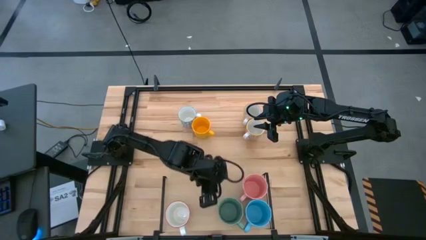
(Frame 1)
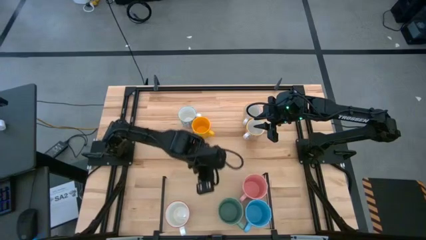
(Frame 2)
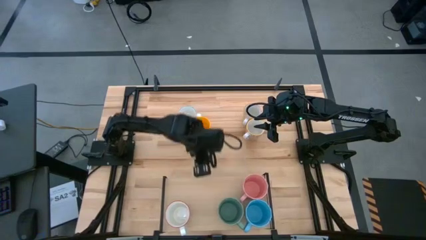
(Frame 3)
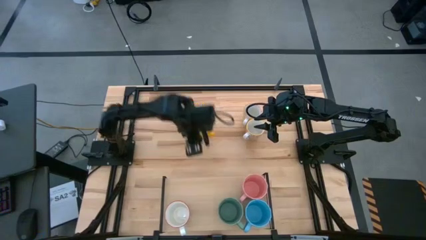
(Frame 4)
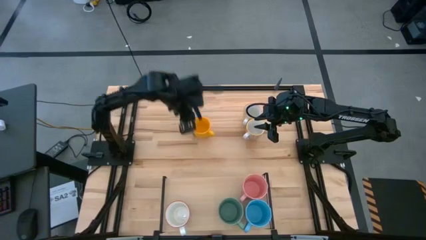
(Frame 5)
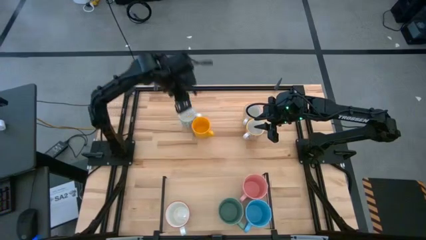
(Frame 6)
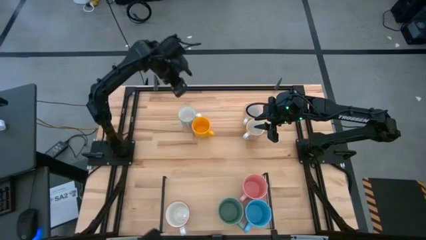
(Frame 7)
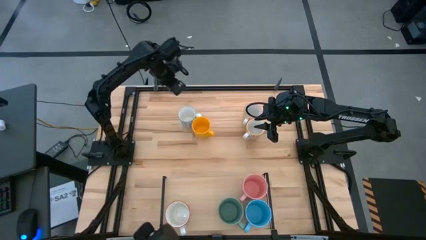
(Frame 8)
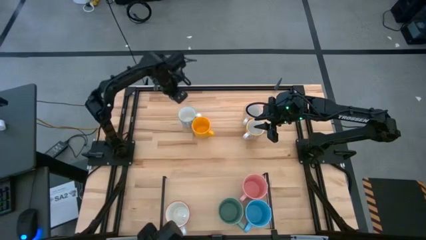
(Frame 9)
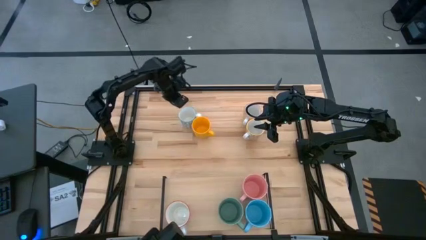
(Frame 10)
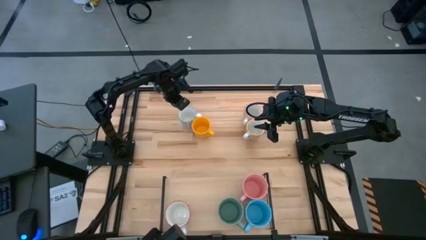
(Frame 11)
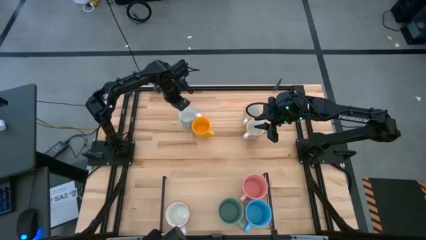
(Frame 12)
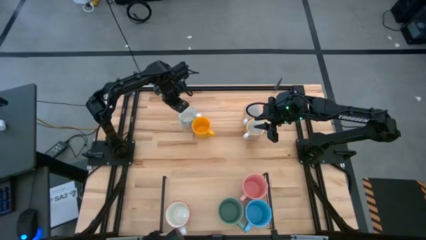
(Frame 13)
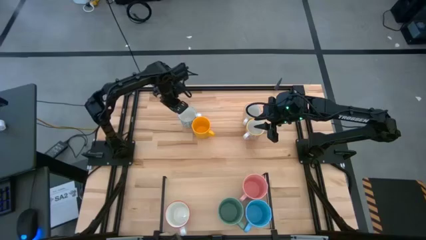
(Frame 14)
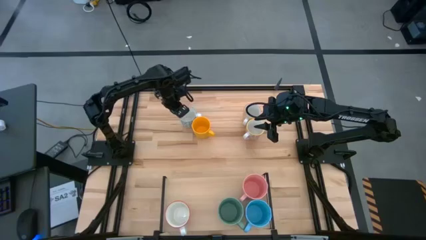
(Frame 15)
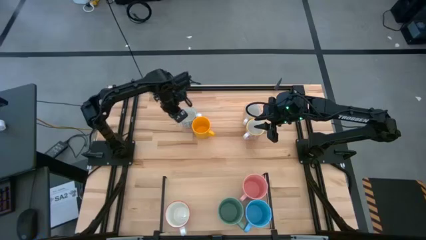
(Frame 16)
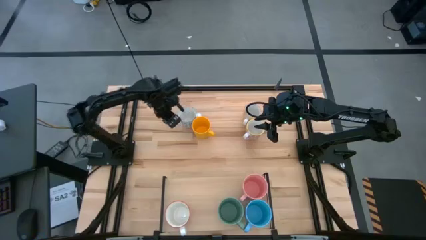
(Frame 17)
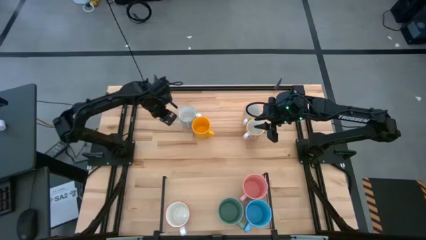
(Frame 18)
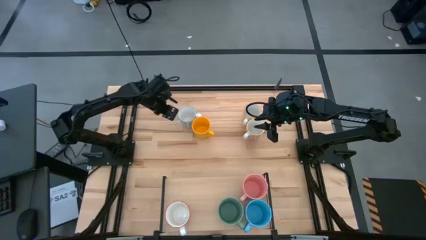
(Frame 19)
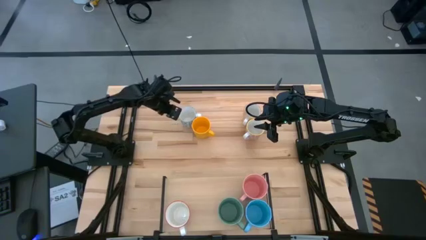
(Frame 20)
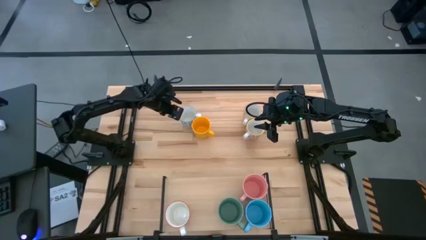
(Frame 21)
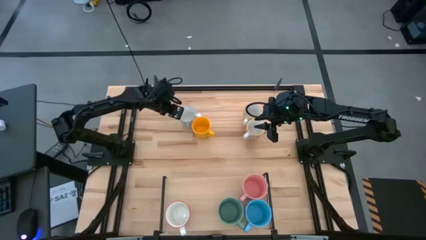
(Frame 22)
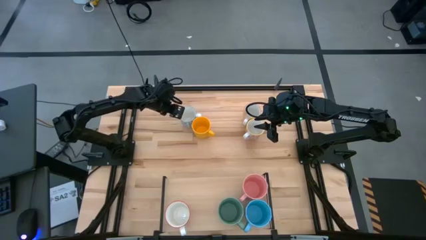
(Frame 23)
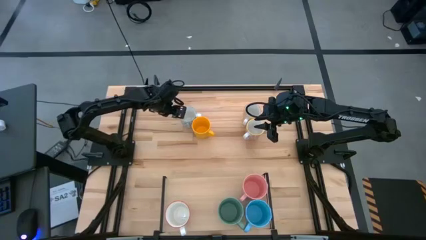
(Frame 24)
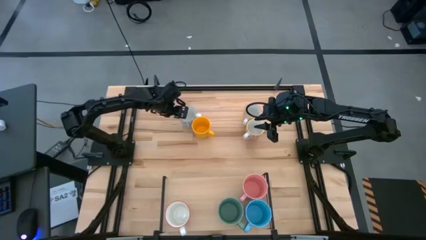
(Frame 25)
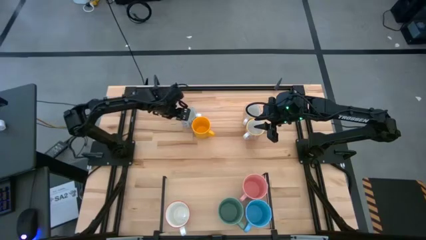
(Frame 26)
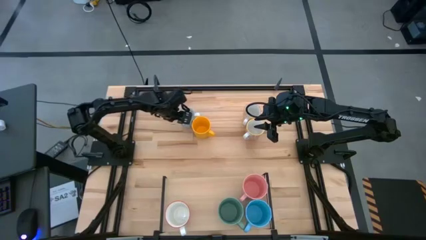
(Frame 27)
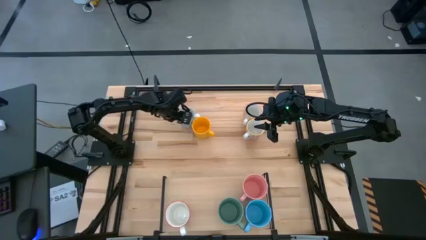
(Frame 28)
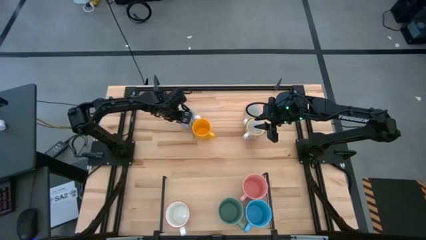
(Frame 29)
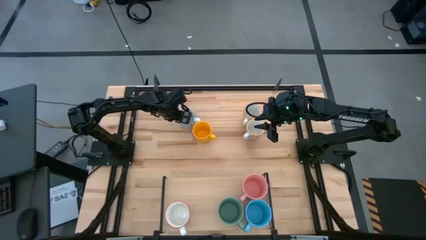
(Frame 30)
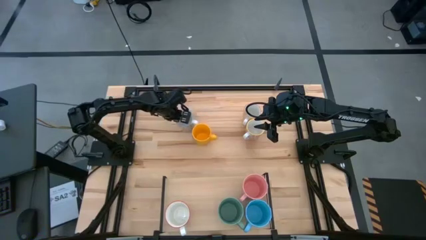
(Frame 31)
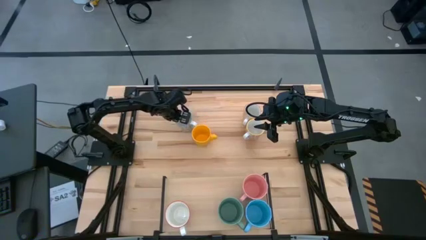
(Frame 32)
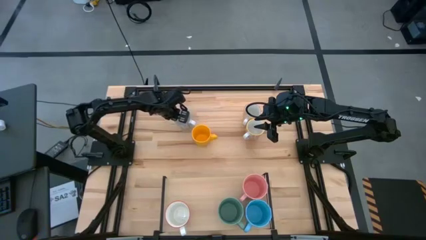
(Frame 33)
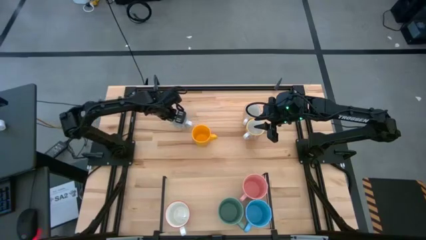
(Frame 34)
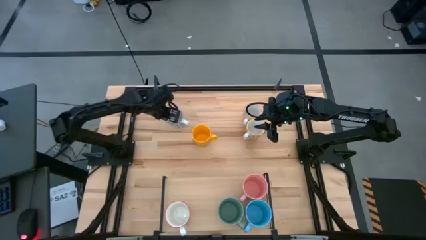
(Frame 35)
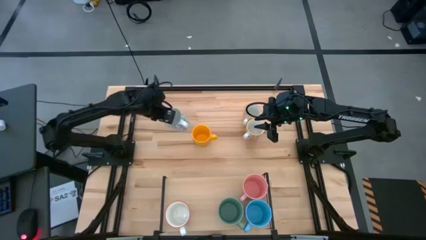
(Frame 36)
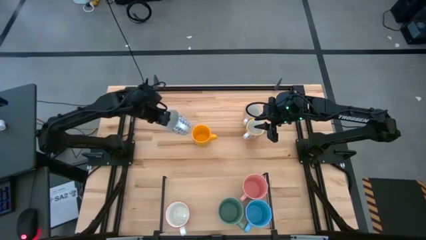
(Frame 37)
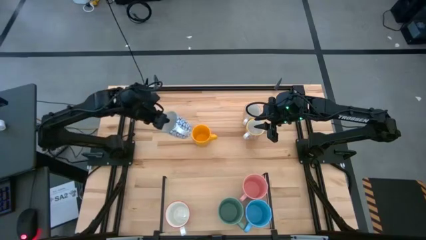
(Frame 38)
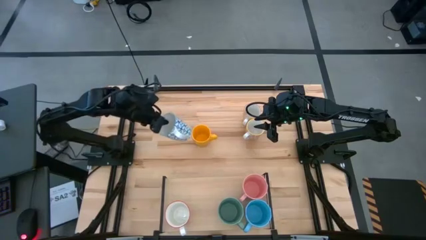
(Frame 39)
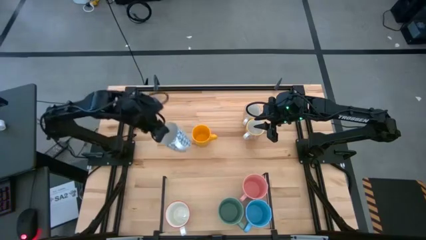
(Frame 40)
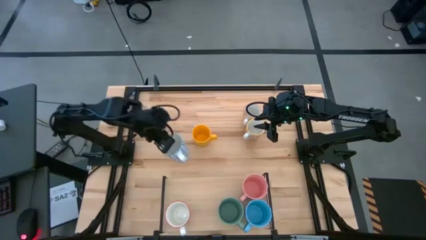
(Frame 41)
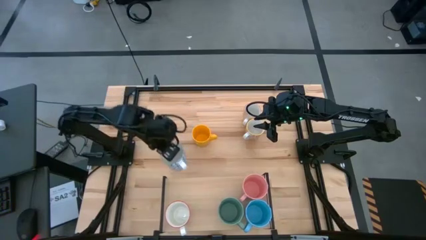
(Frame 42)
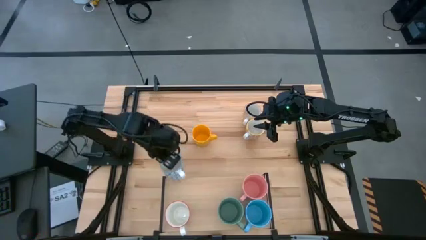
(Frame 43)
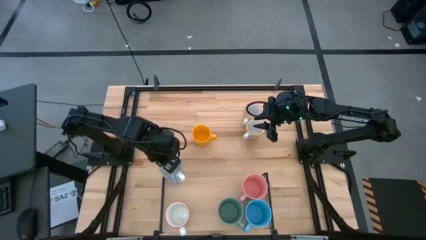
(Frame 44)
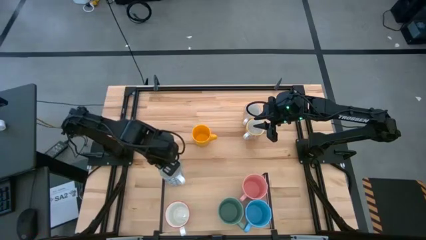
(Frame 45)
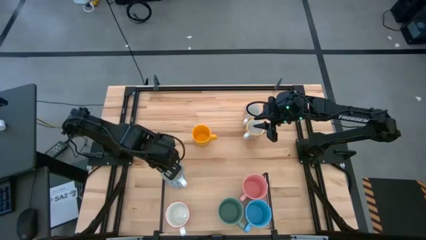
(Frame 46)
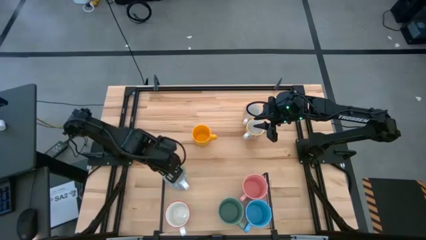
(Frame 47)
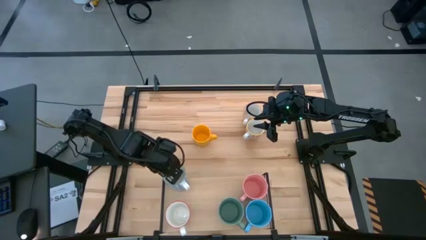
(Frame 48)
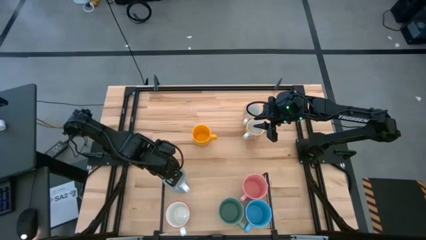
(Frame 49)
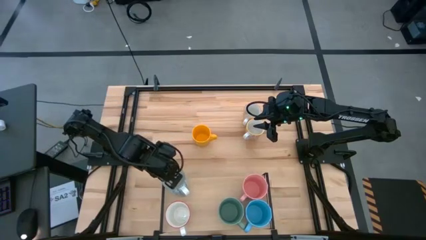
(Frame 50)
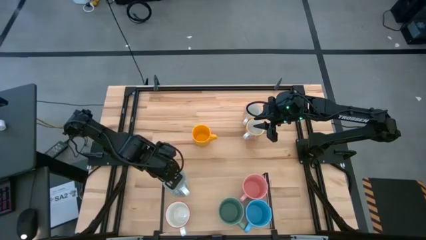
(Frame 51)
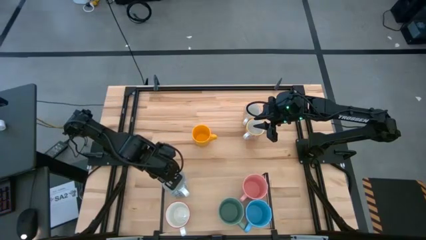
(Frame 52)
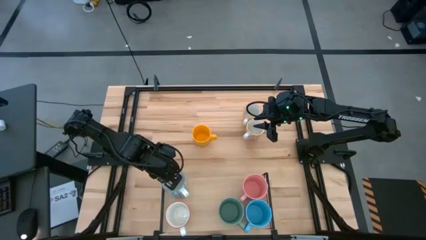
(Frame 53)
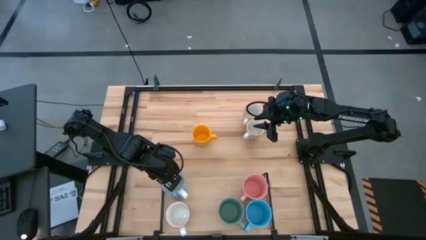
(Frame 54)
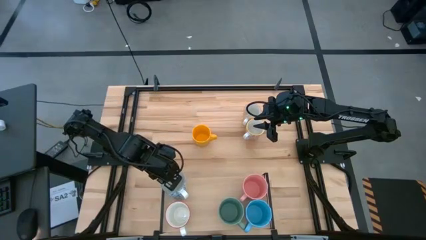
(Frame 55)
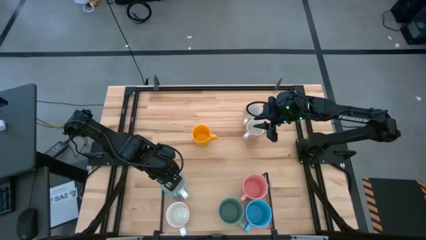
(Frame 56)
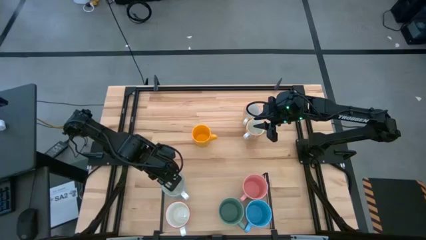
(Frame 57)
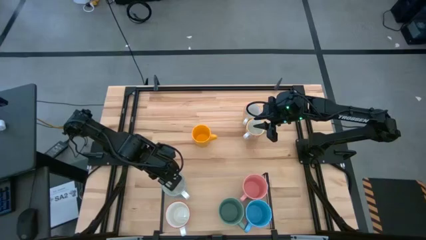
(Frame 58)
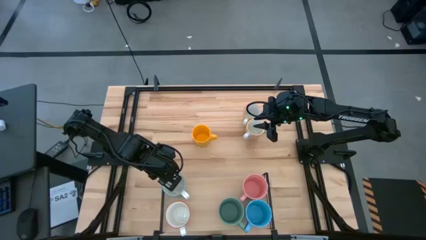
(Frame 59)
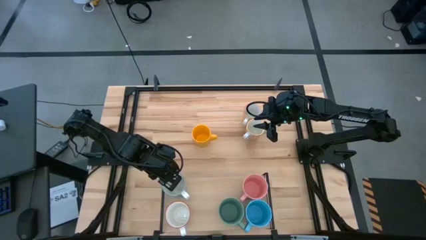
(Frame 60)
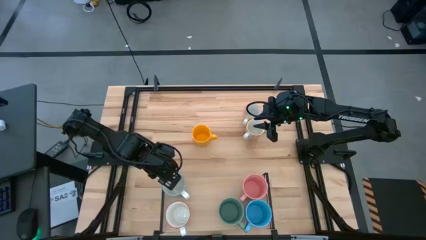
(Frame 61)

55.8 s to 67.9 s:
Task: Place coffee mugs
Put the dark blue mug on the shelf

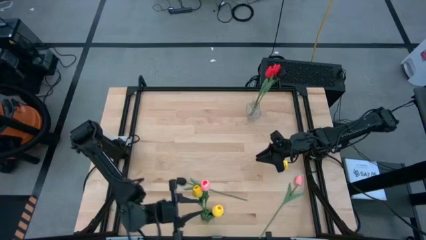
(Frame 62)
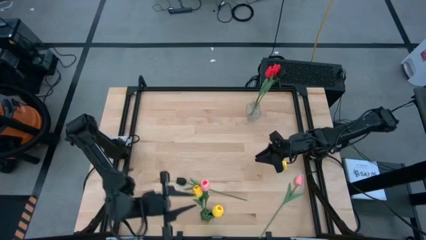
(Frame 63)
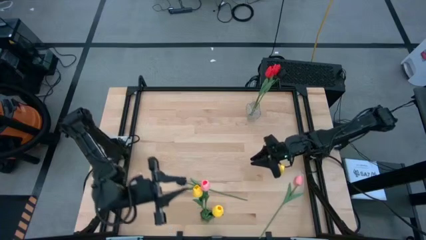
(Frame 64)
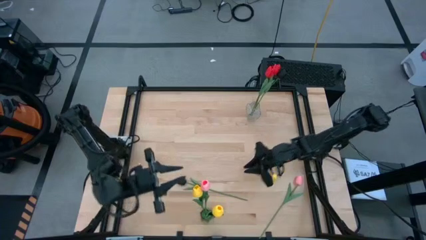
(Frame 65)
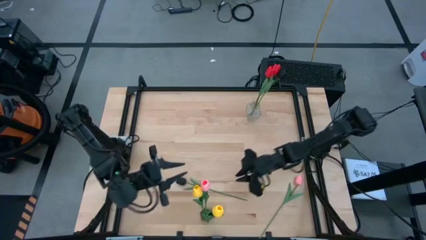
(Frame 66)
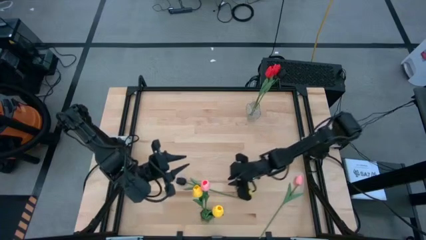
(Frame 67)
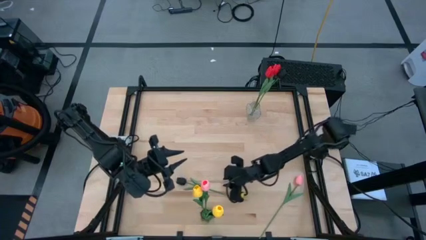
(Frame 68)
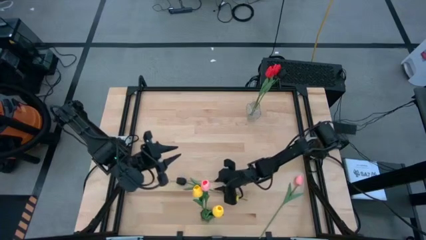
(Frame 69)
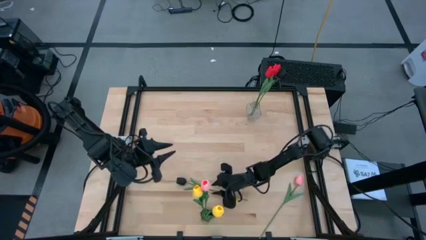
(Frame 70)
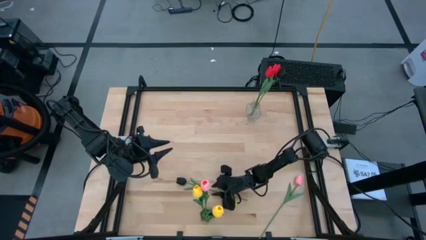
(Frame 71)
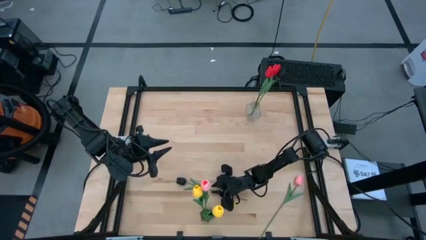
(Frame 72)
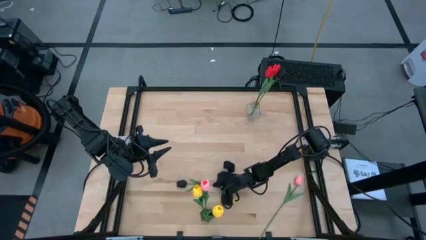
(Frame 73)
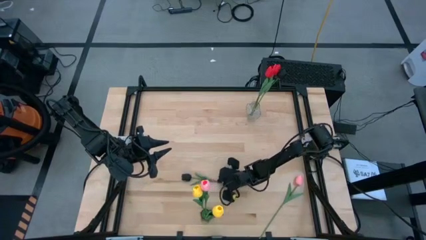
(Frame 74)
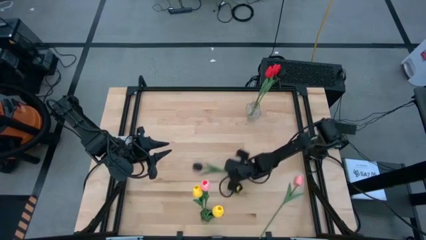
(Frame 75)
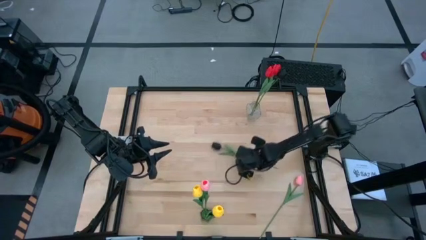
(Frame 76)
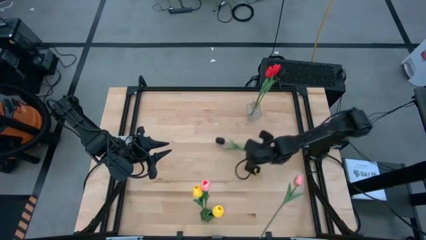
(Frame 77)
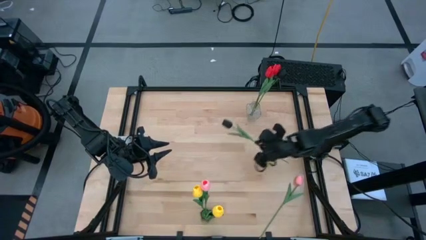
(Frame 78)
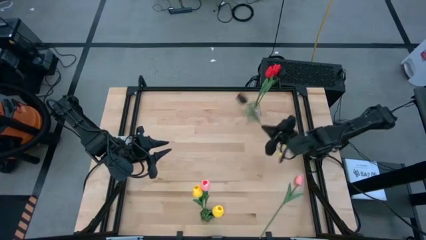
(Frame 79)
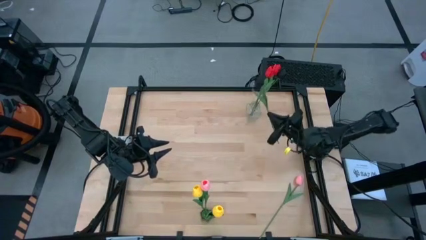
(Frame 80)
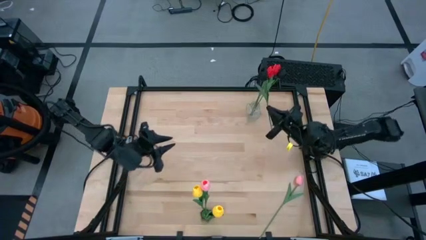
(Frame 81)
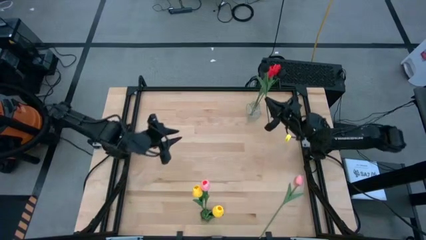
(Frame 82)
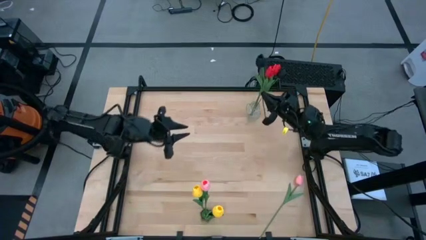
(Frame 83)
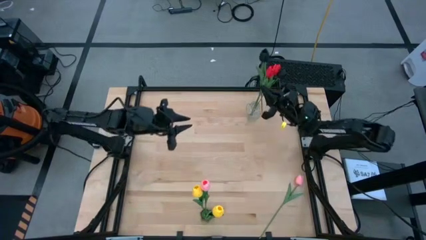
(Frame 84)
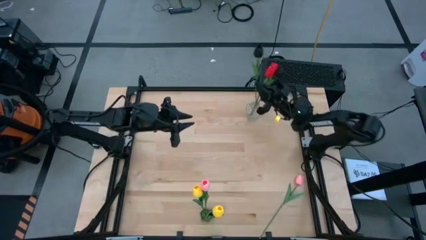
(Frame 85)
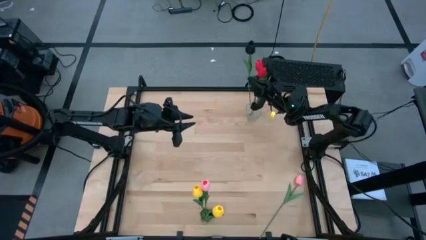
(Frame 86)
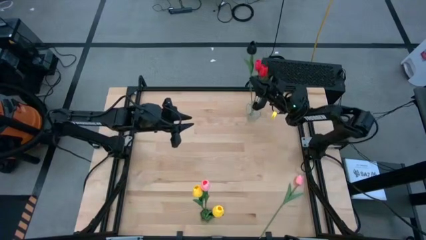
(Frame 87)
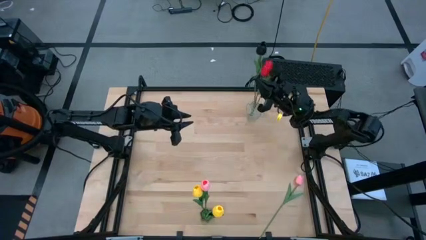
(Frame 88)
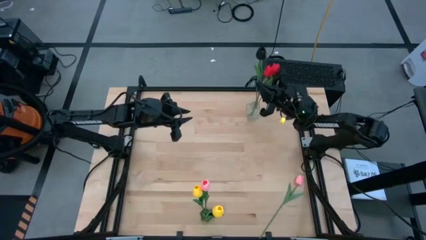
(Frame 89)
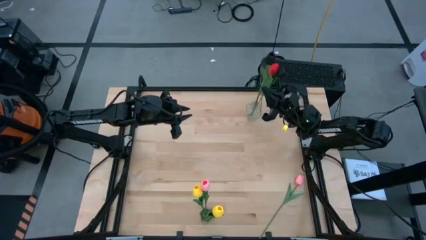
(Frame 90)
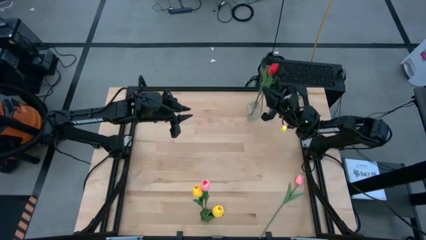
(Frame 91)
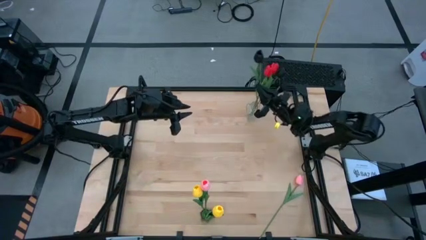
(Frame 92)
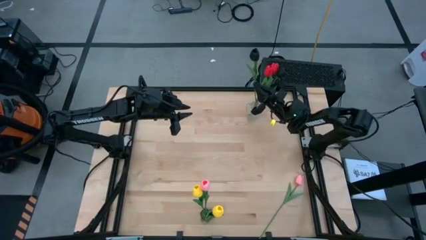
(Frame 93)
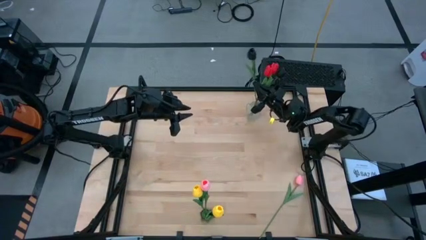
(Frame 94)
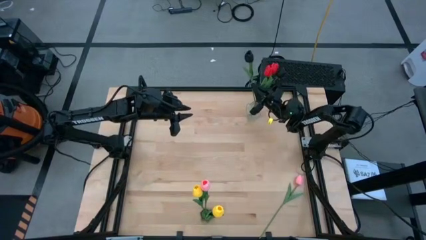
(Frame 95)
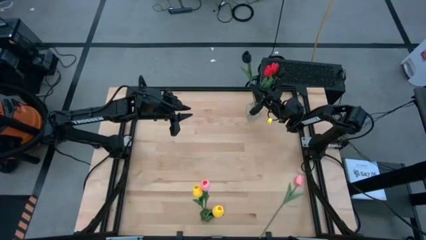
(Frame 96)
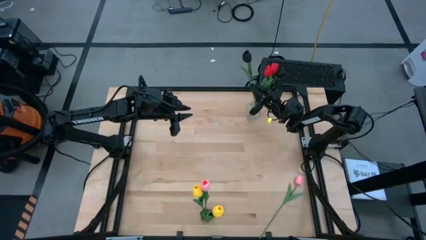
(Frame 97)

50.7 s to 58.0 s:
Task: Sort flowers into vase by color
Put the black flower into the transparent vase
